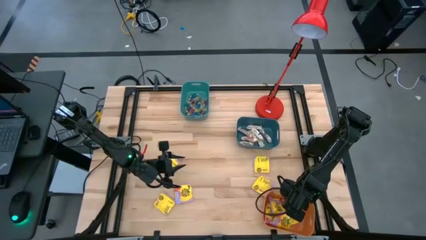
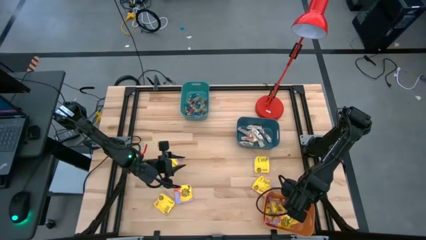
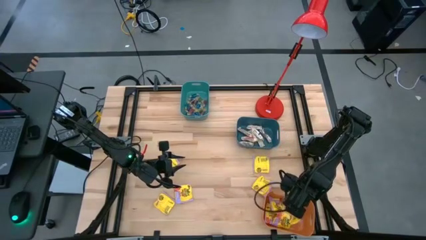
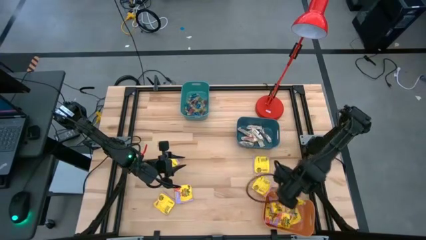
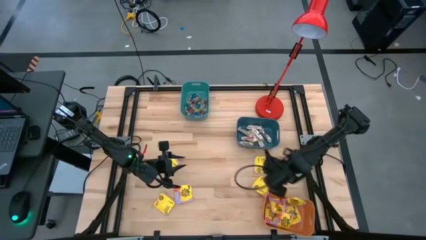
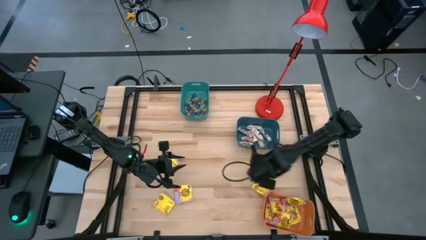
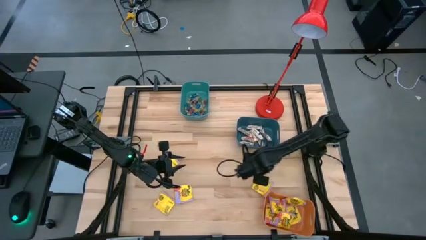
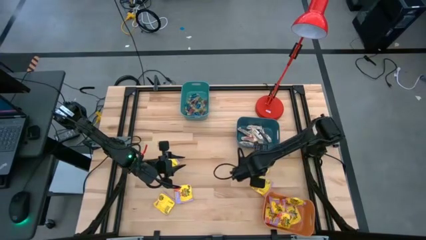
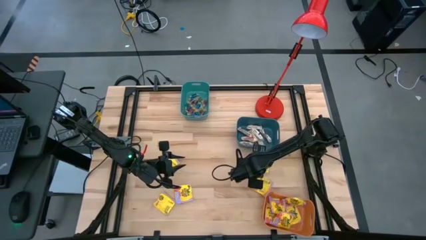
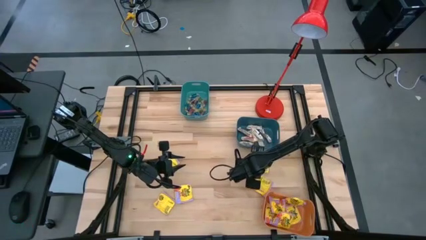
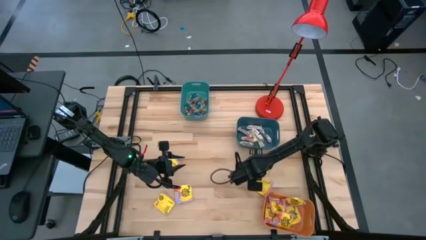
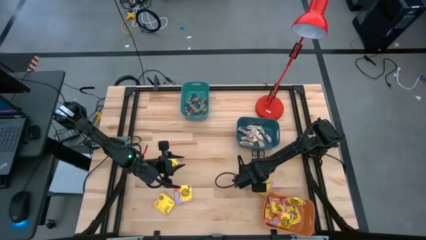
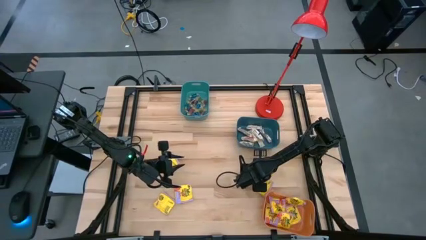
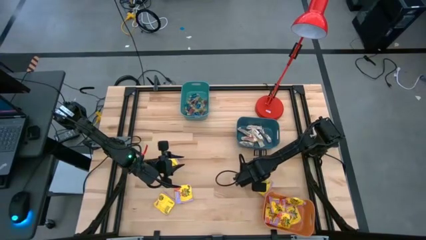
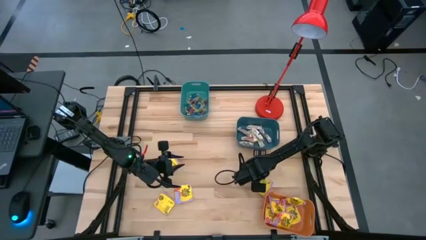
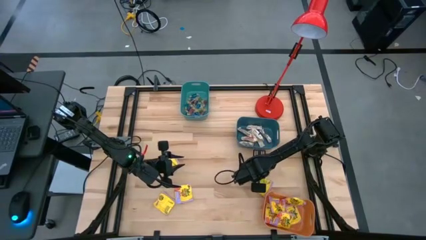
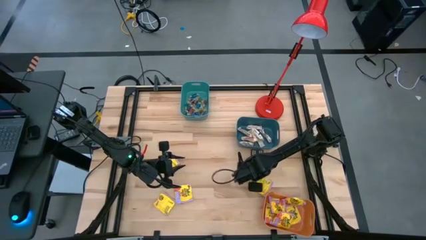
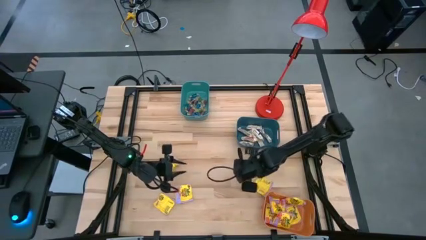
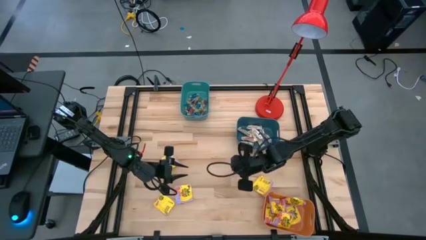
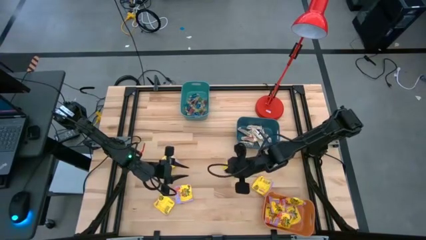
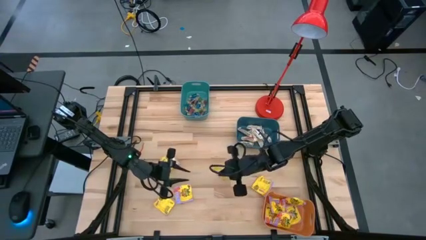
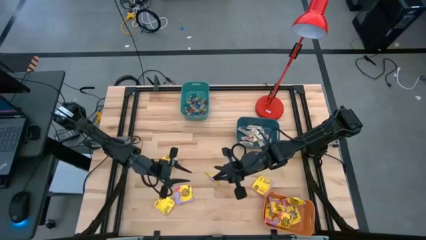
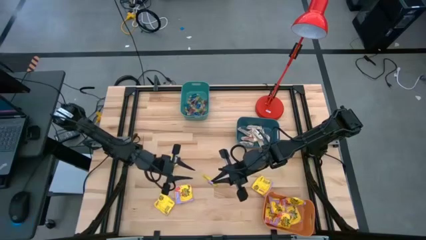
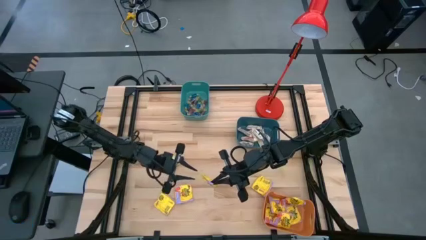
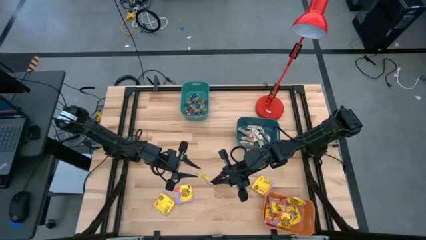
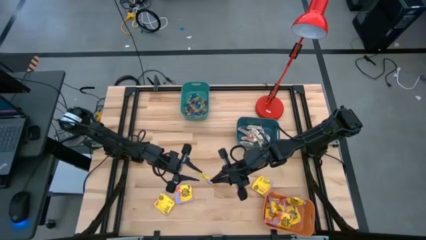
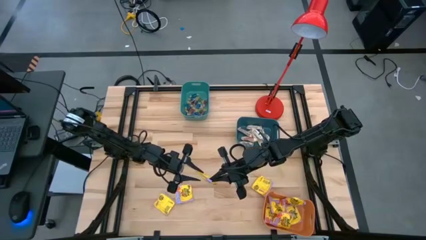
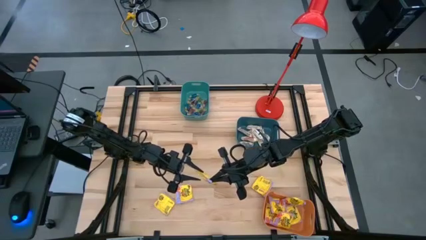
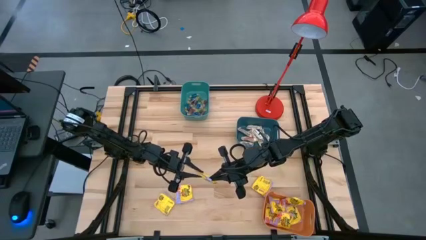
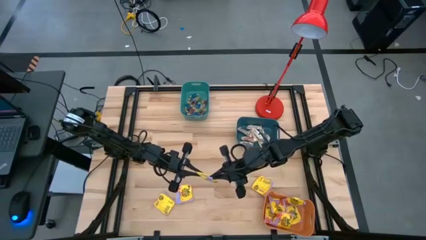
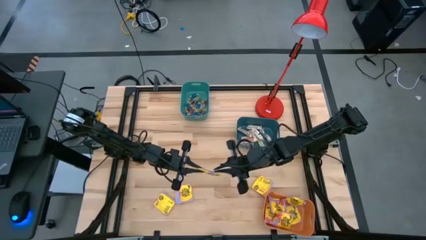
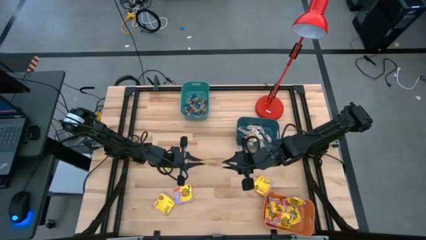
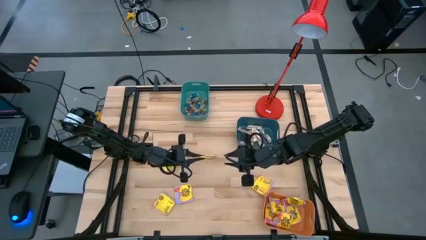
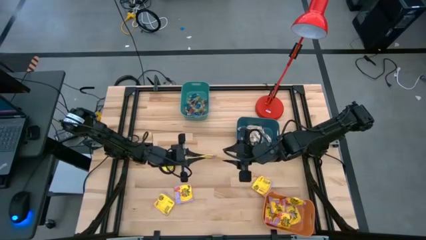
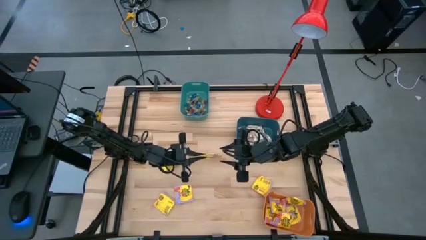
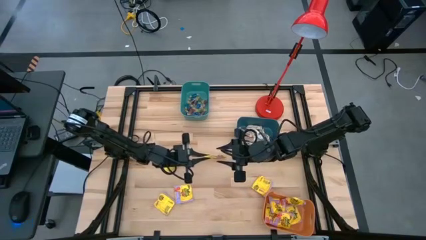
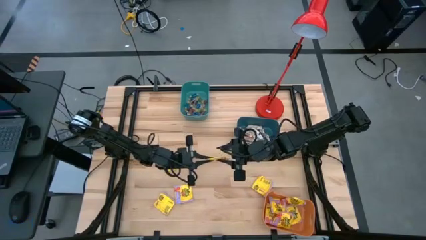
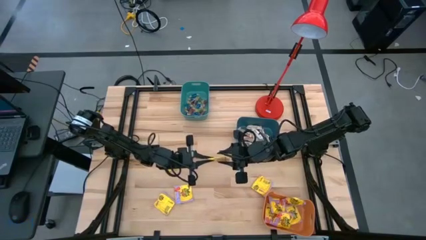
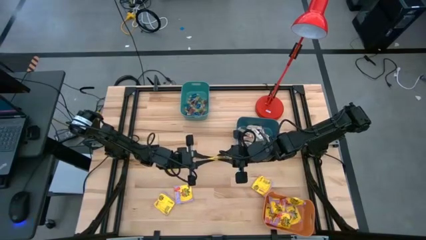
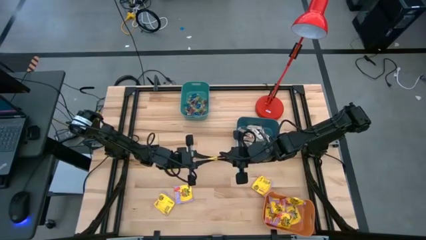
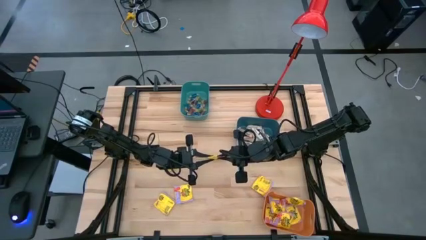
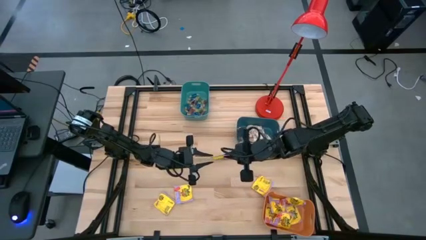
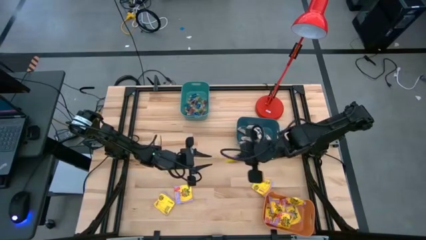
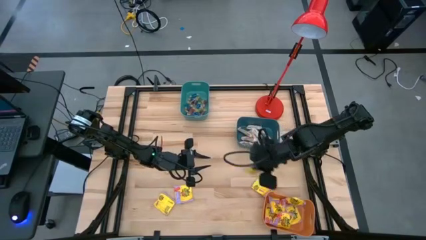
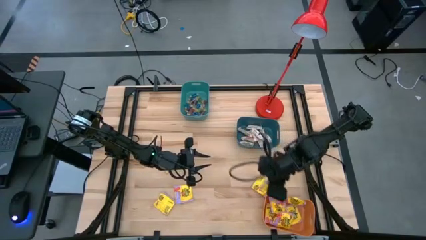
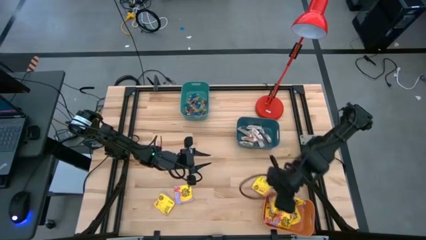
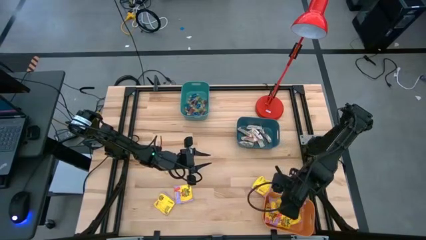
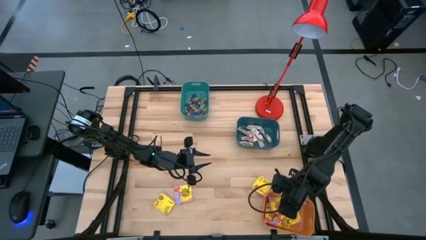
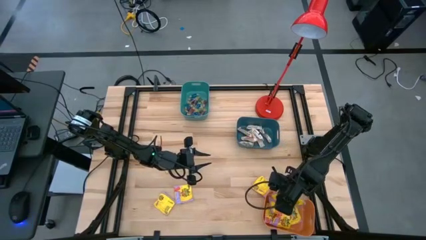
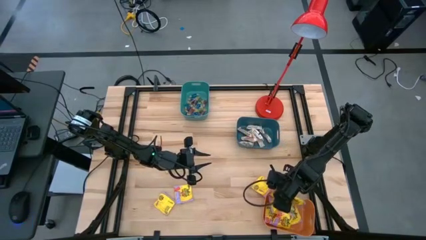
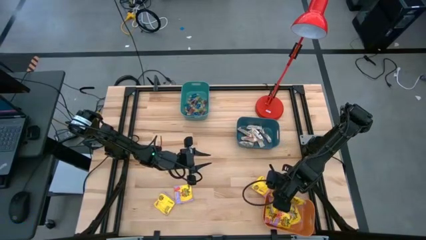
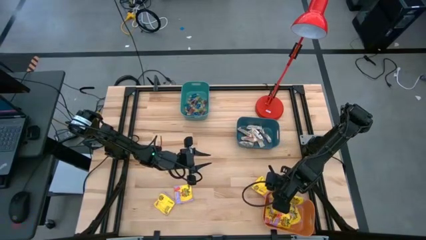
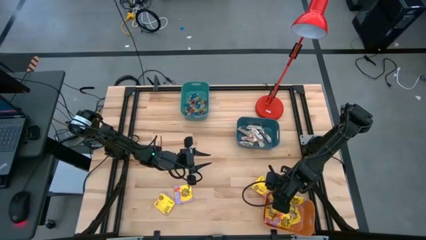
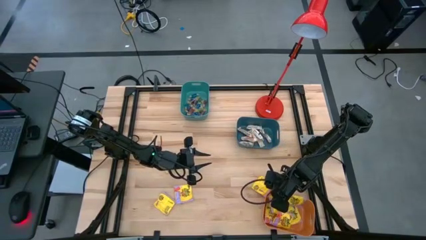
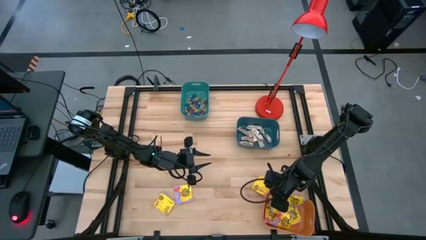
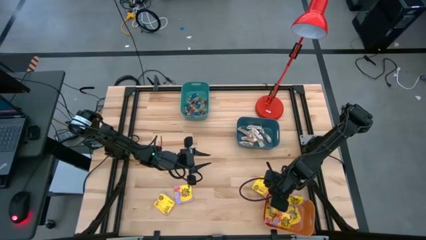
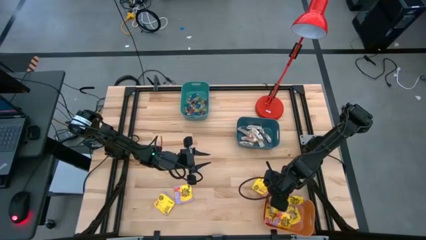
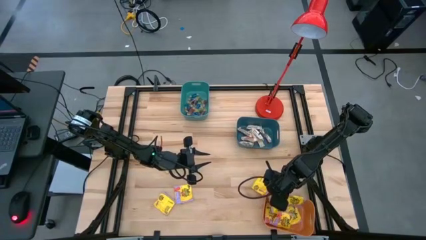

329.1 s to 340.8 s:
Task: Sort candy
Put the yellow candy bag into the orange bin
